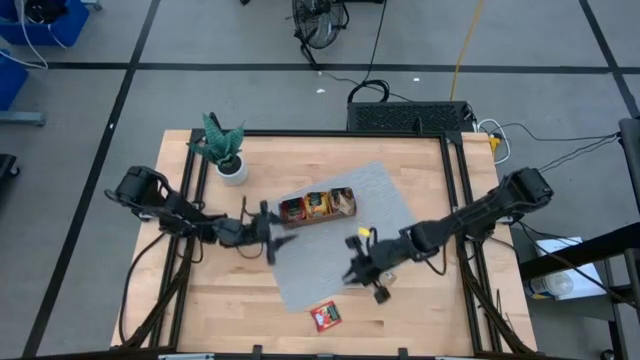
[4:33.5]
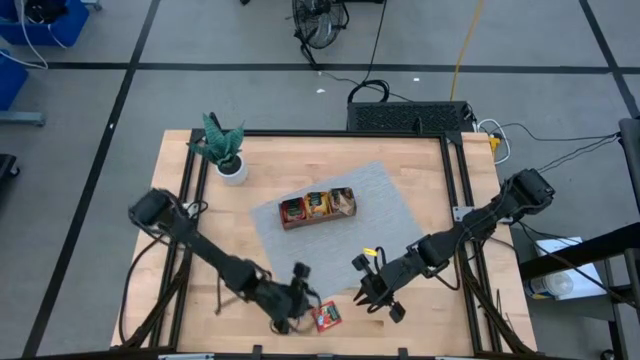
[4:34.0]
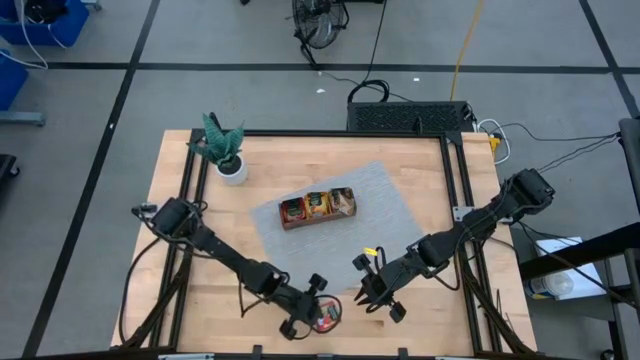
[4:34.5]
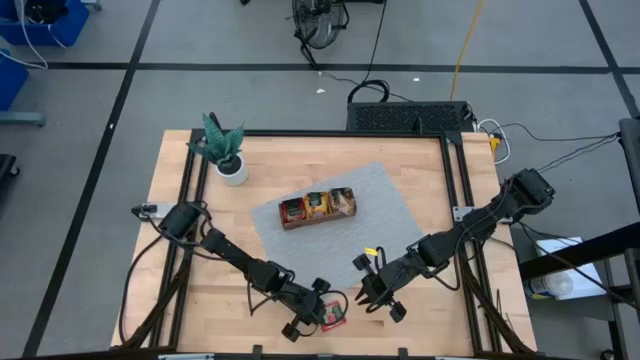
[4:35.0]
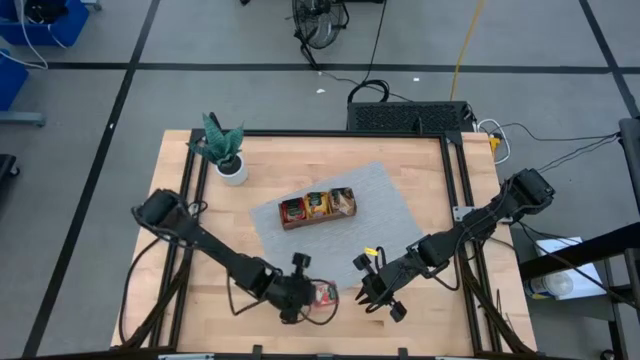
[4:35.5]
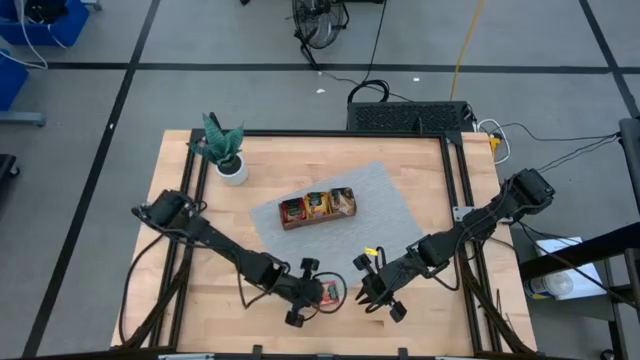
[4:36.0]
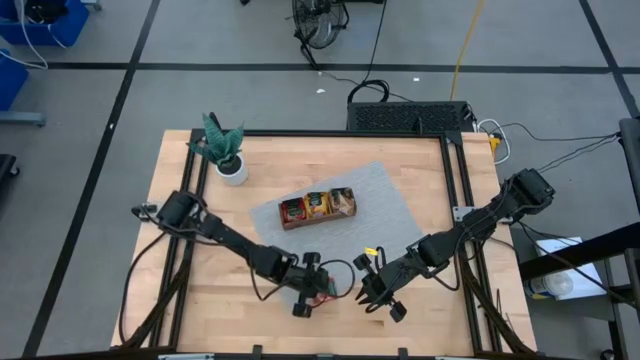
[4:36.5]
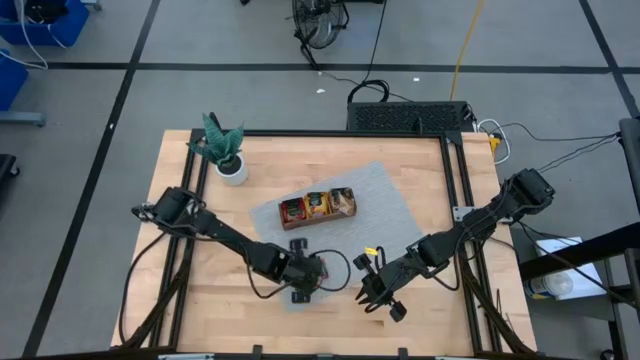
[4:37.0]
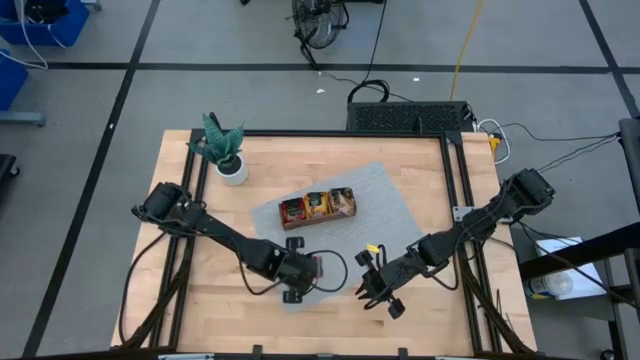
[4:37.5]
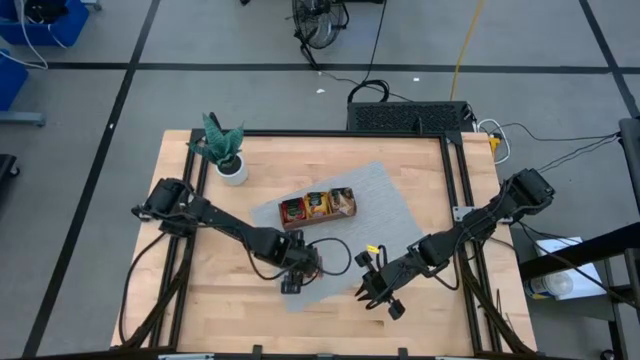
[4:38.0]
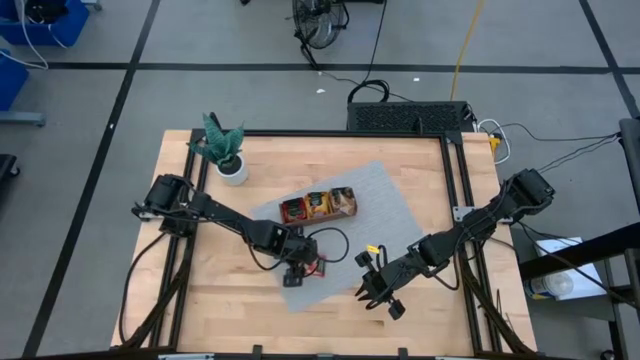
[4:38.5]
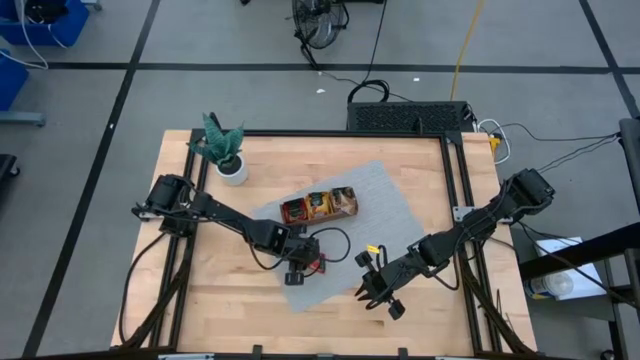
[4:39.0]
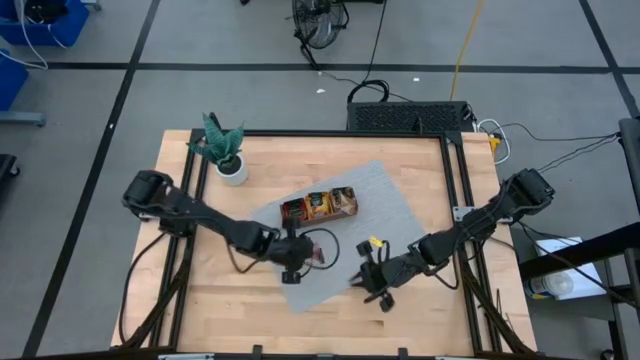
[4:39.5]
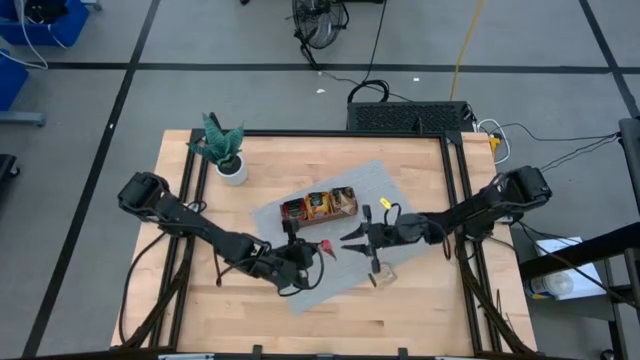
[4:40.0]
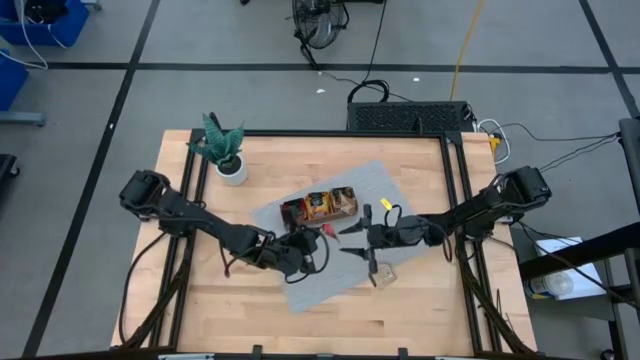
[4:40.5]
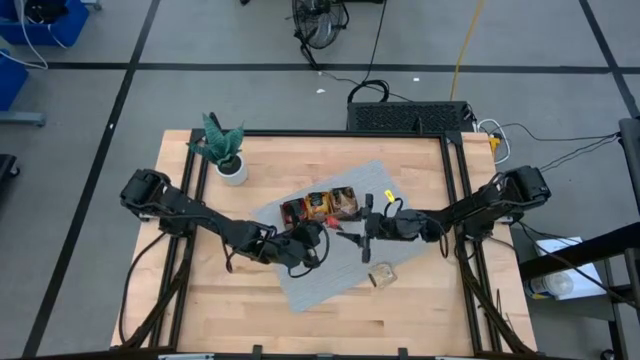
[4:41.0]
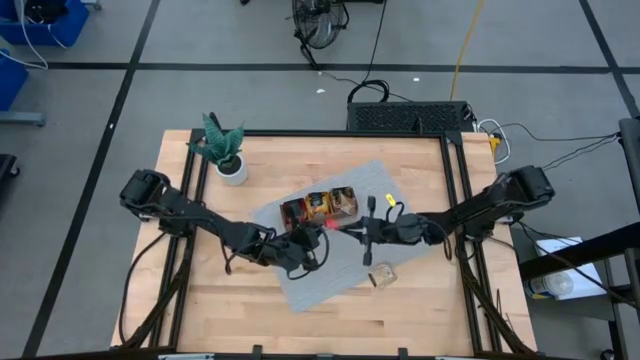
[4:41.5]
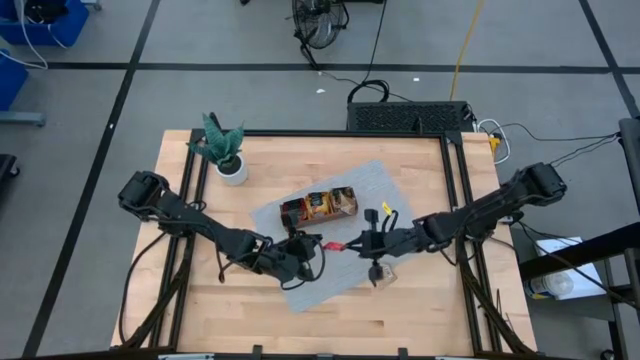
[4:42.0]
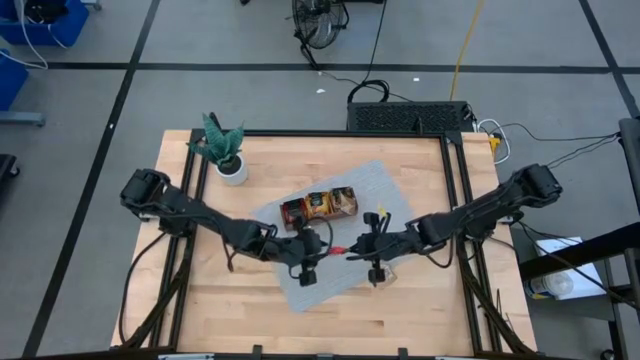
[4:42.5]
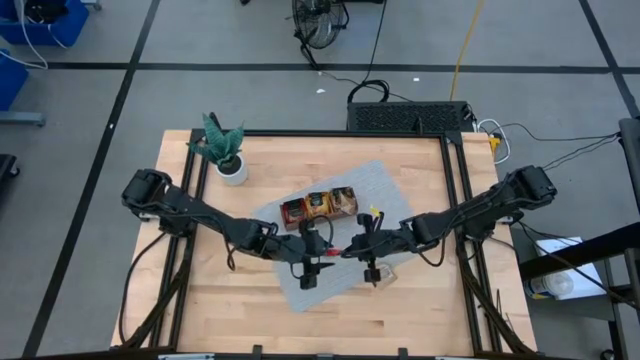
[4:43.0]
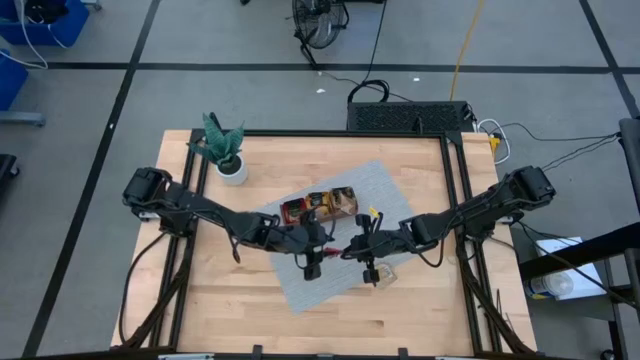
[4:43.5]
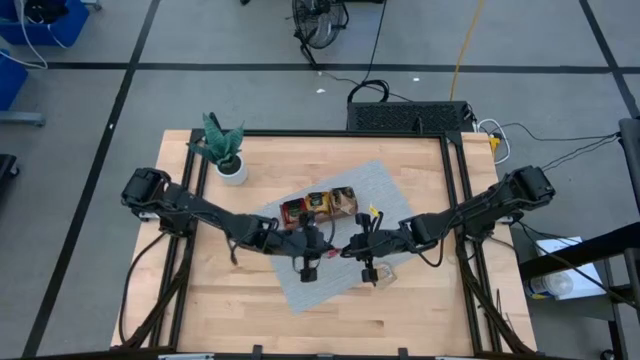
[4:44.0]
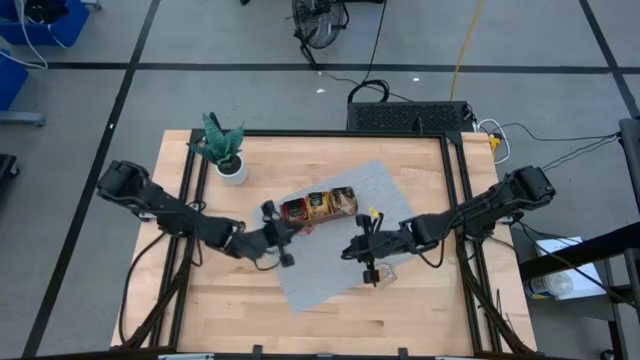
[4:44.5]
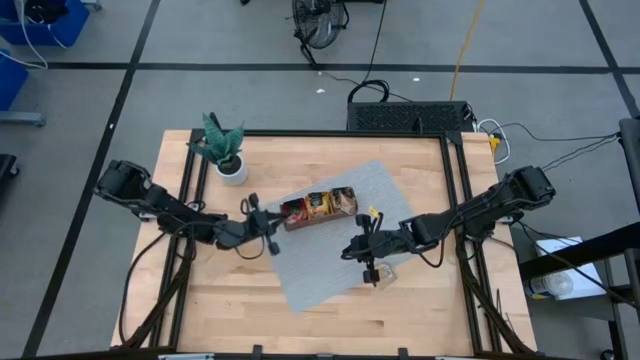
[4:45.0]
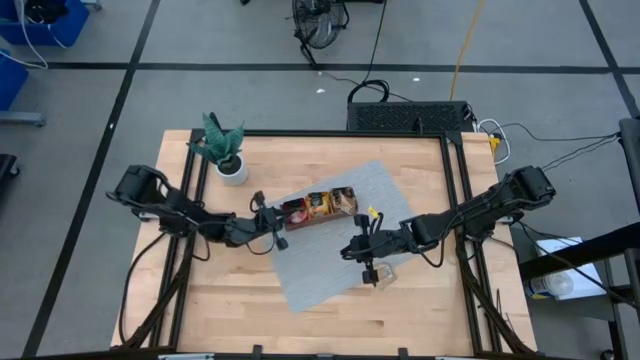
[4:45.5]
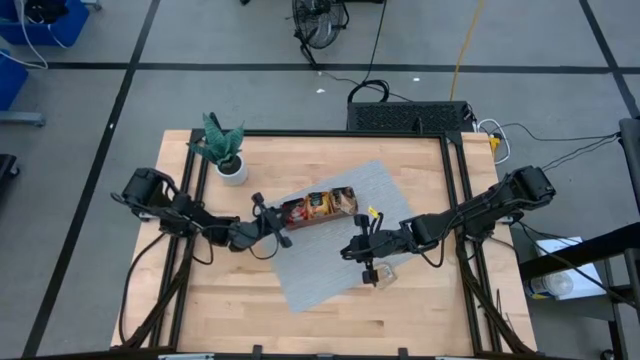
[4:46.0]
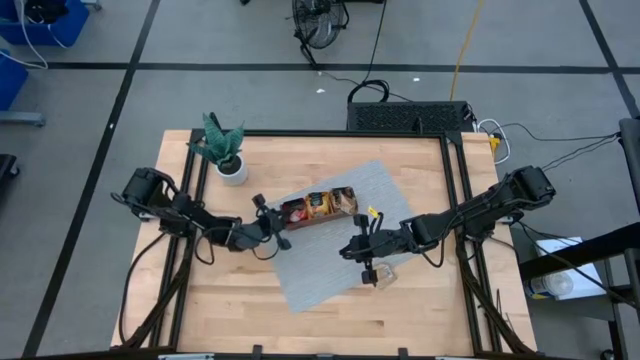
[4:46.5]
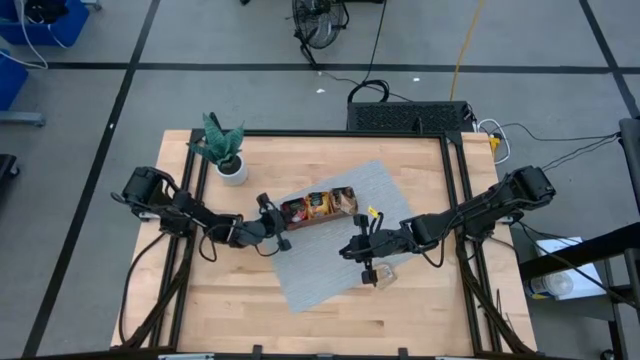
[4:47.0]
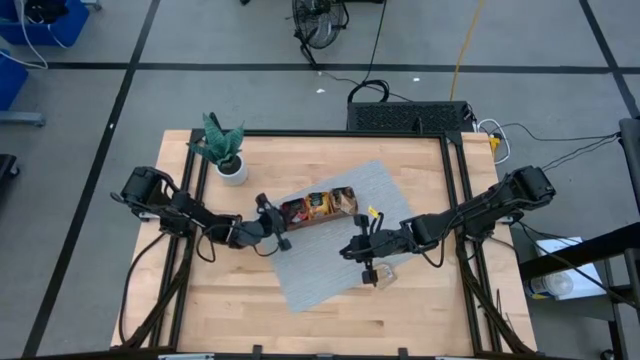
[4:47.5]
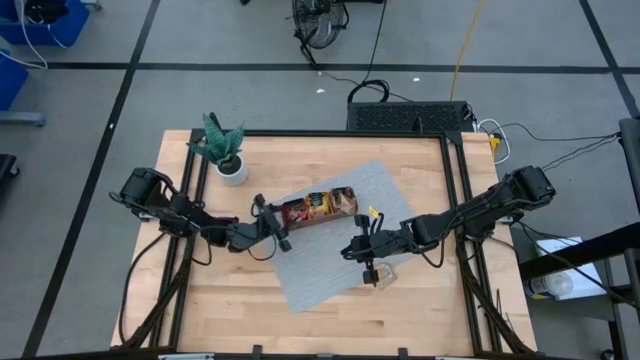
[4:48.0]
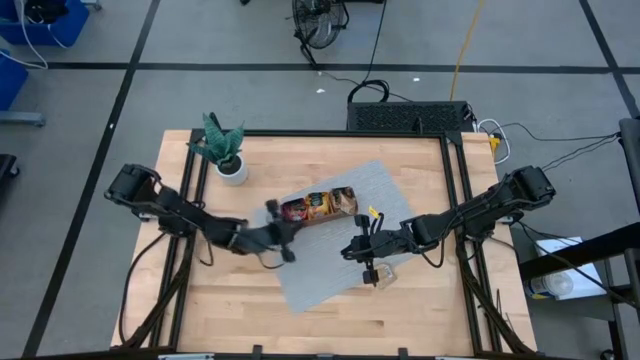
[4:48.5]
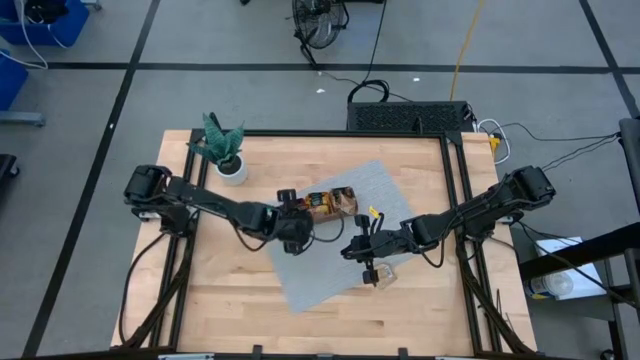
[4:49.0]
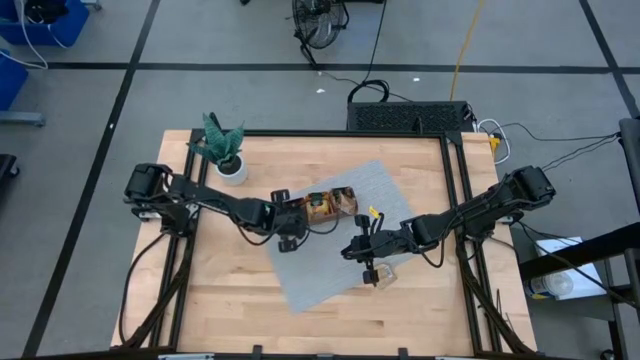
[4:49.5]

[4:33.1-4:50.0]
Task: Pick & Place Tea
Put the red tea into the left part of the wooden organizer

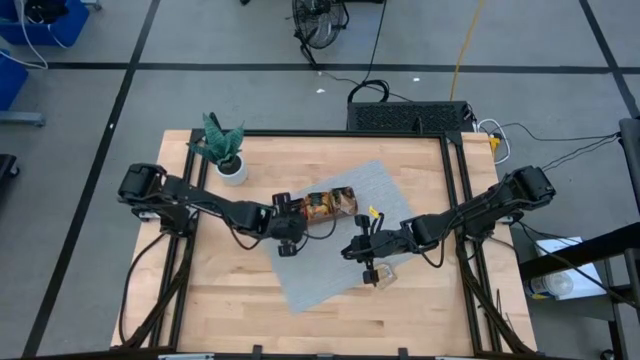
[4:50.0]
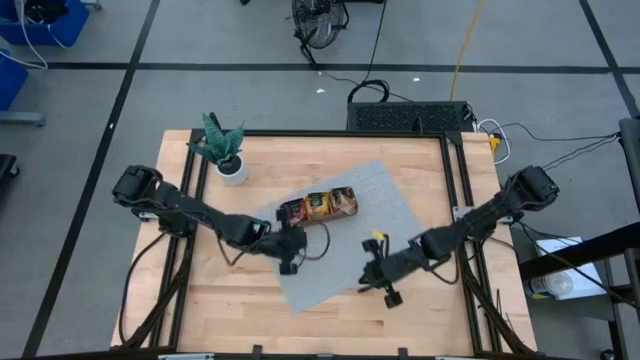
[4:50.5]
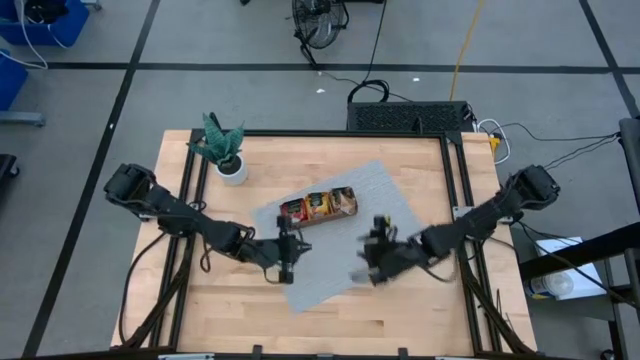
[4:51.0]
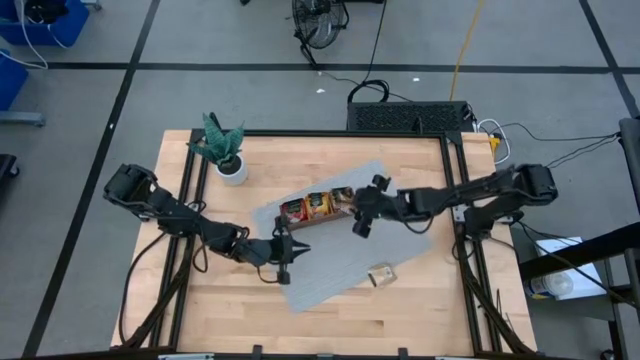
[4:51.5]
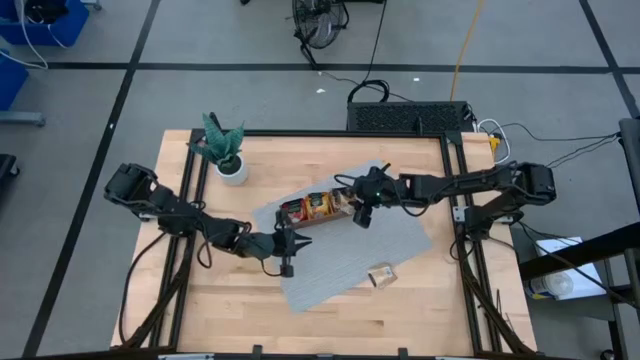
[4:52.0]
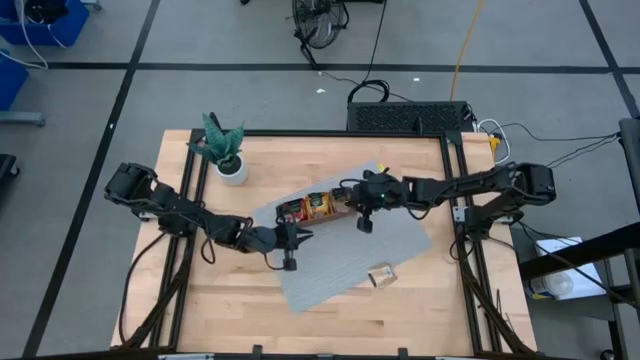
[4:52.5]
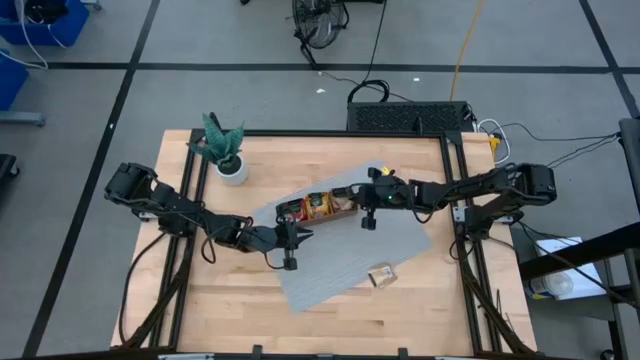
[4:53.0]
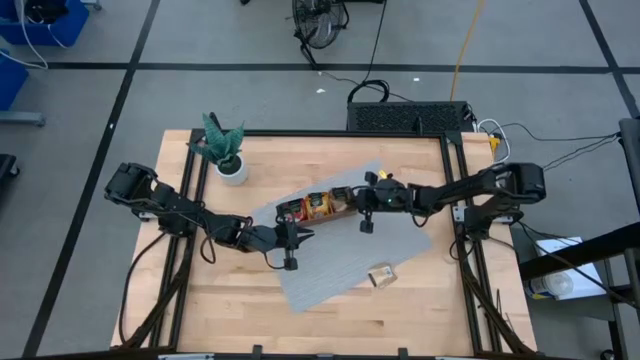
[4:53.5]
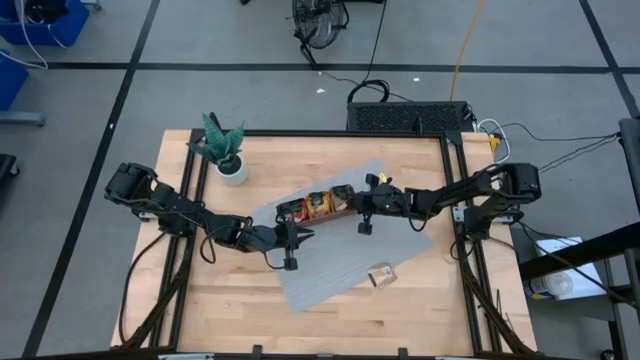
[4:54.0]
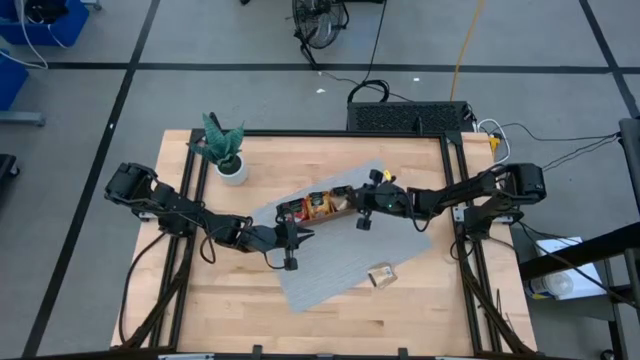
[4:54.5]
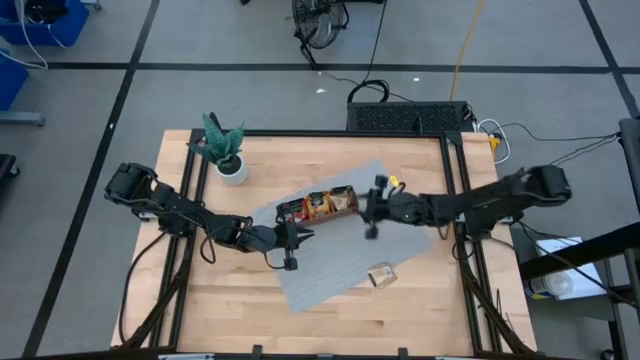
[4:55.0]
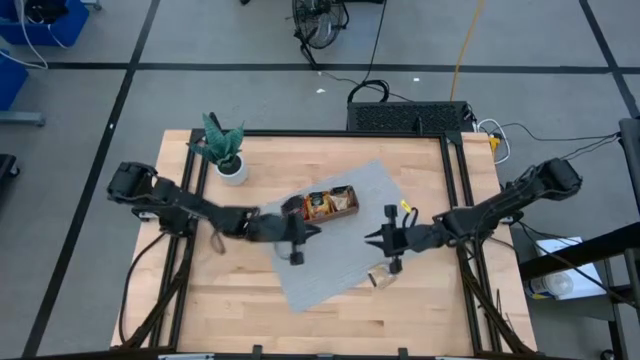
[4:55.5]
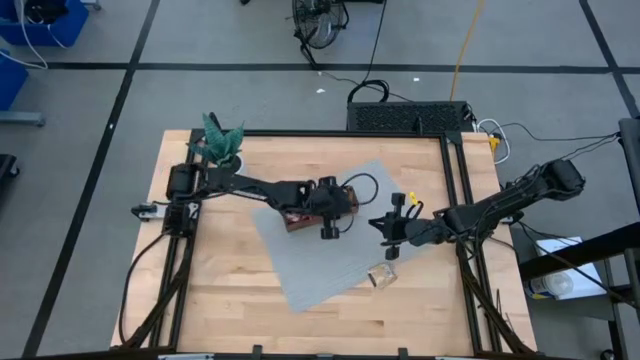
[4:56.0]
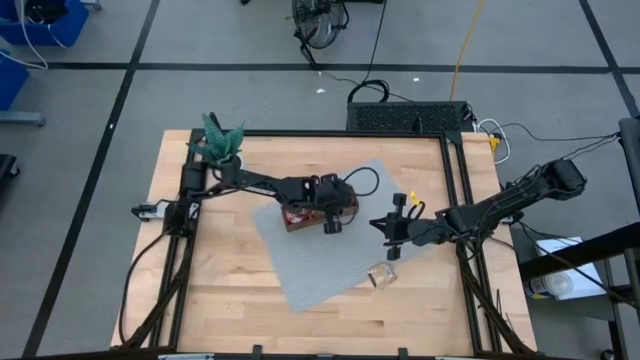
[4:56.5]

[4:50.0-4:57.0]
Adjust the brown tea in the wooden organizer
